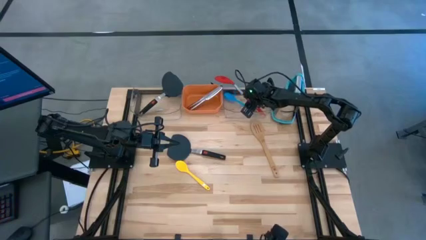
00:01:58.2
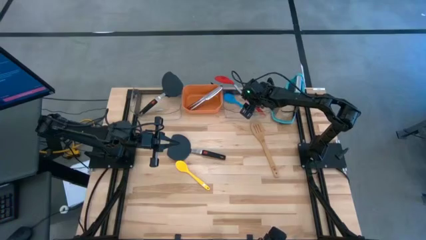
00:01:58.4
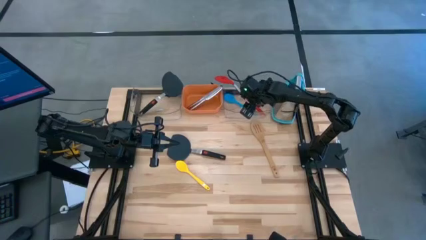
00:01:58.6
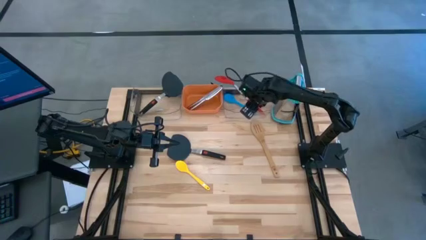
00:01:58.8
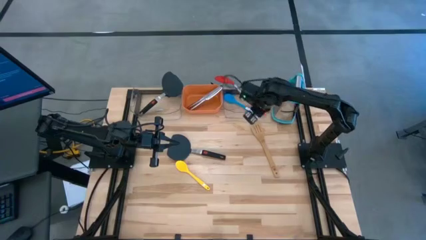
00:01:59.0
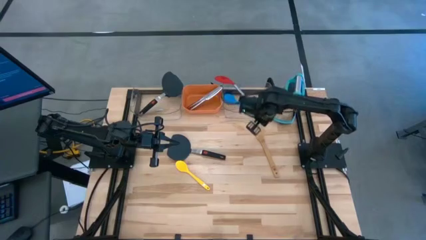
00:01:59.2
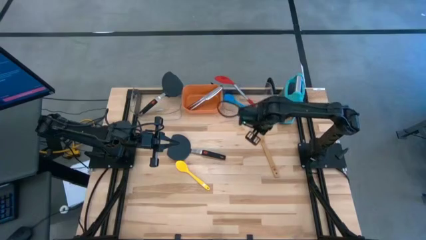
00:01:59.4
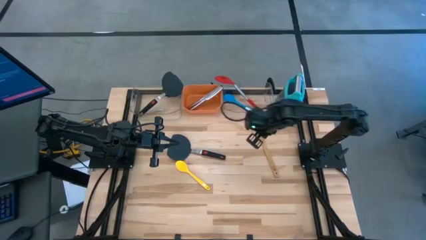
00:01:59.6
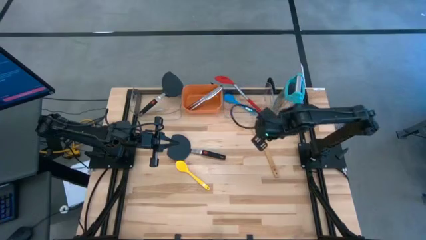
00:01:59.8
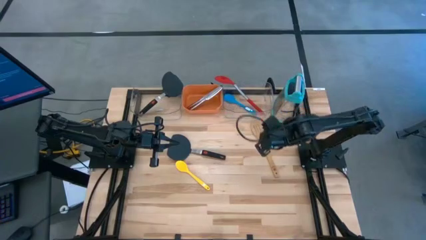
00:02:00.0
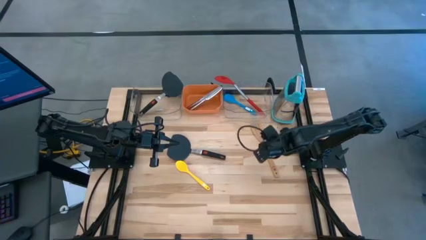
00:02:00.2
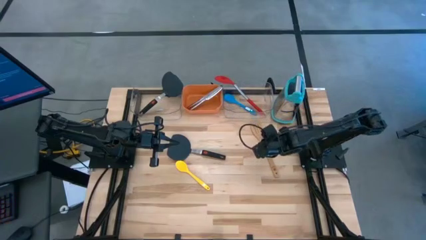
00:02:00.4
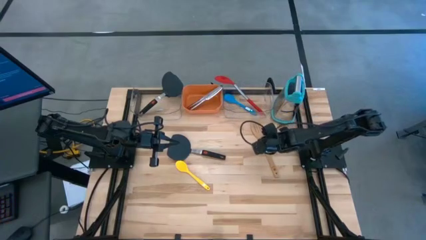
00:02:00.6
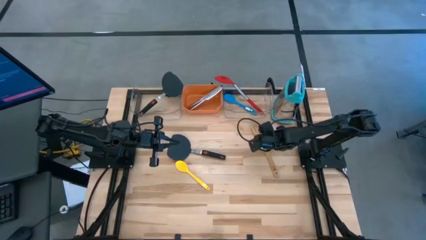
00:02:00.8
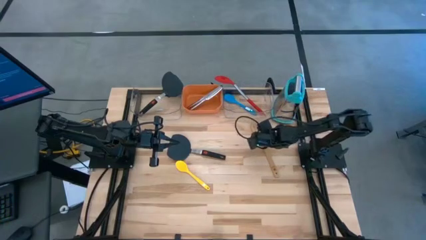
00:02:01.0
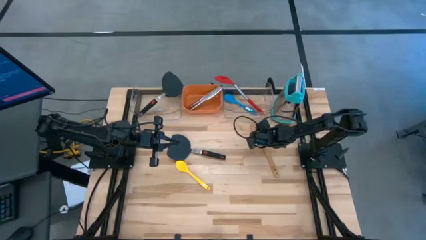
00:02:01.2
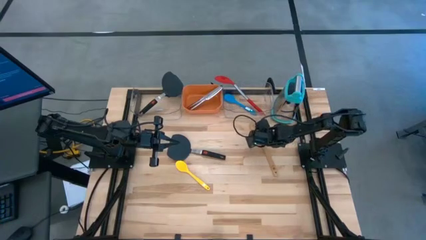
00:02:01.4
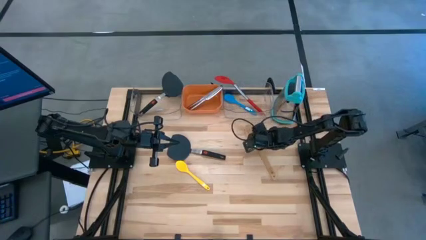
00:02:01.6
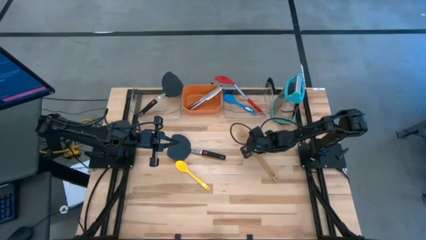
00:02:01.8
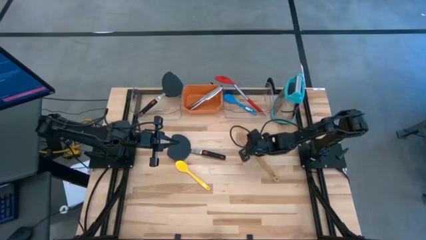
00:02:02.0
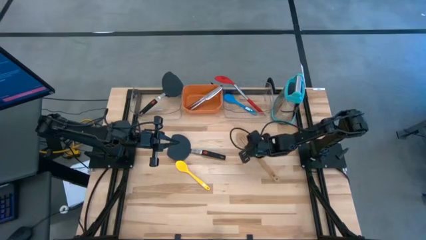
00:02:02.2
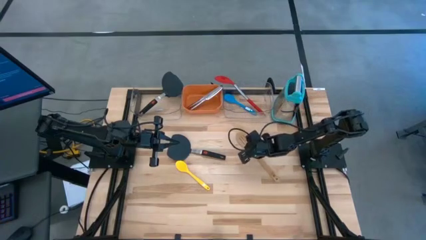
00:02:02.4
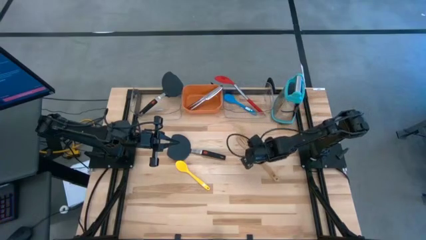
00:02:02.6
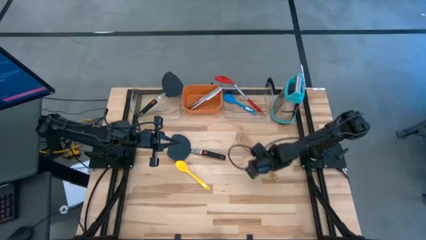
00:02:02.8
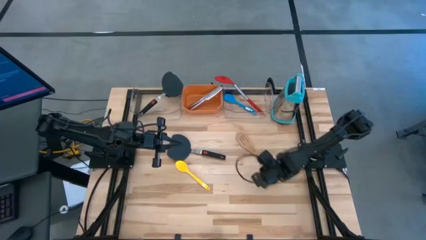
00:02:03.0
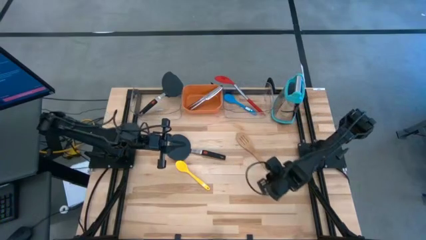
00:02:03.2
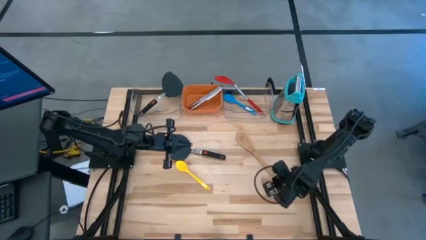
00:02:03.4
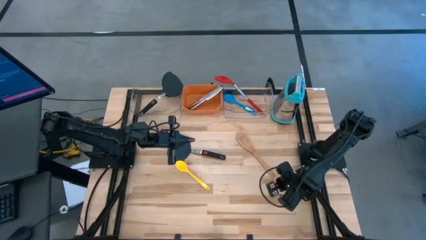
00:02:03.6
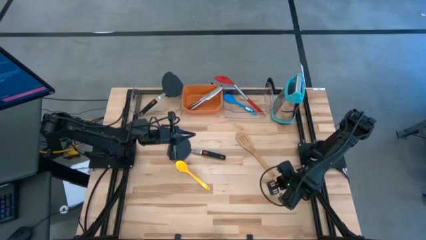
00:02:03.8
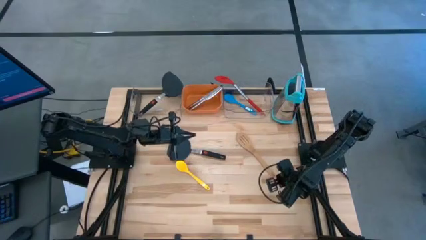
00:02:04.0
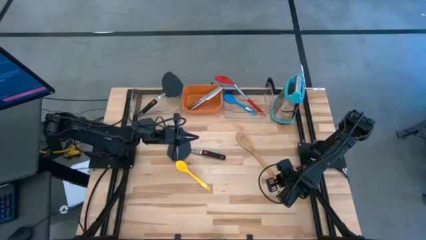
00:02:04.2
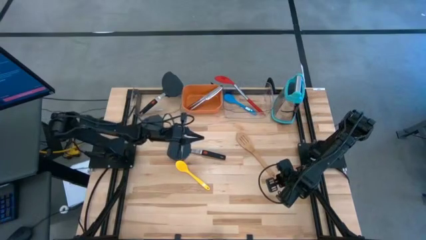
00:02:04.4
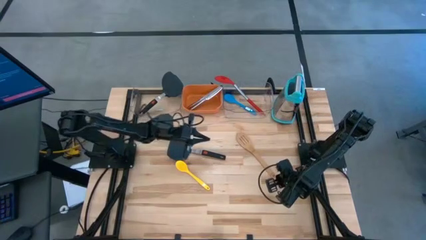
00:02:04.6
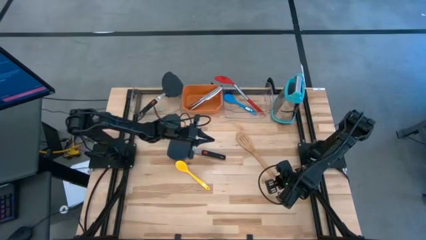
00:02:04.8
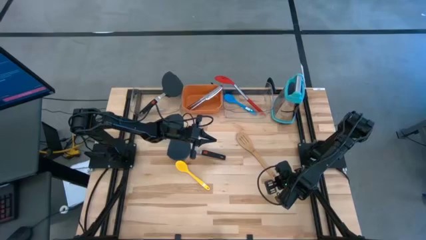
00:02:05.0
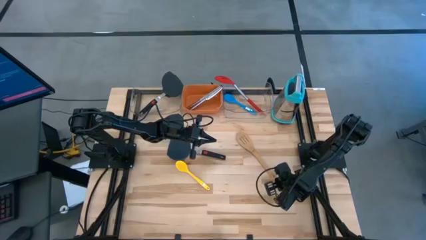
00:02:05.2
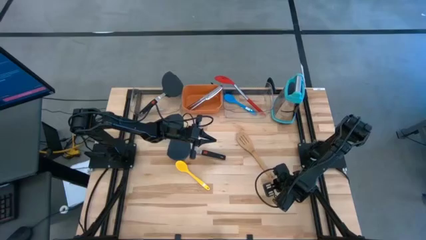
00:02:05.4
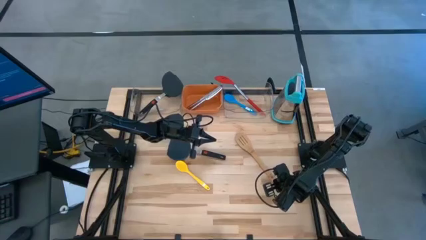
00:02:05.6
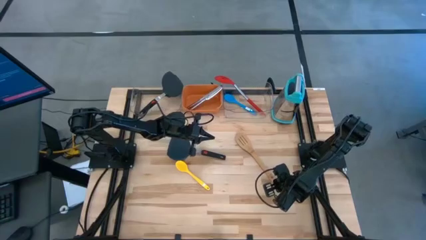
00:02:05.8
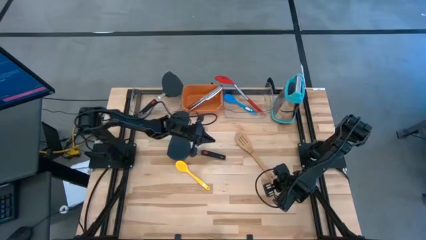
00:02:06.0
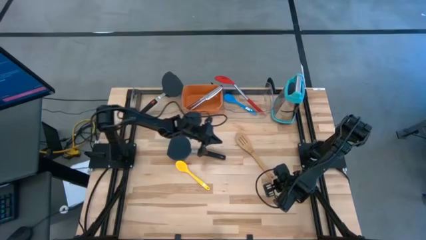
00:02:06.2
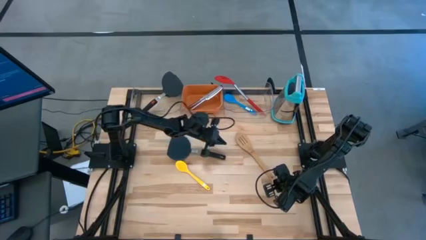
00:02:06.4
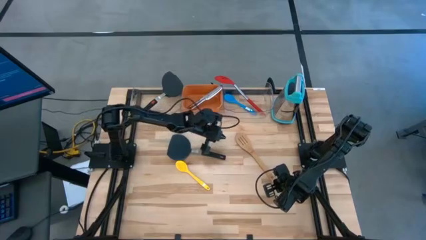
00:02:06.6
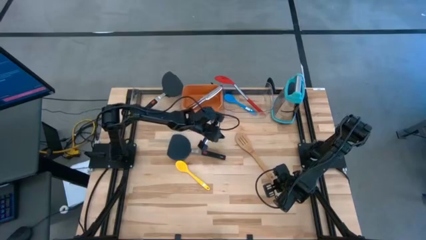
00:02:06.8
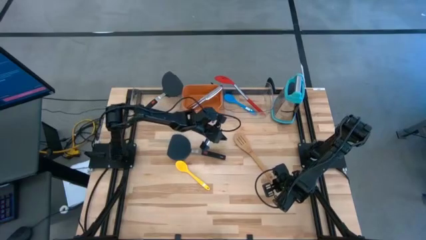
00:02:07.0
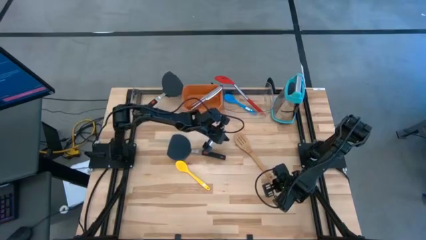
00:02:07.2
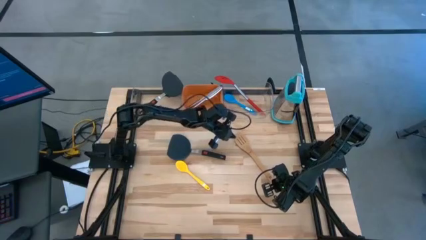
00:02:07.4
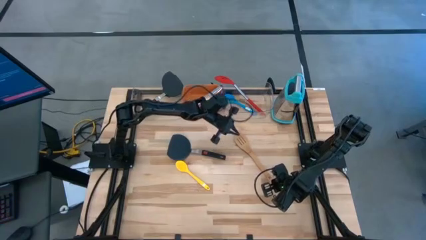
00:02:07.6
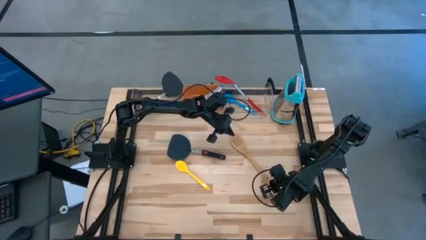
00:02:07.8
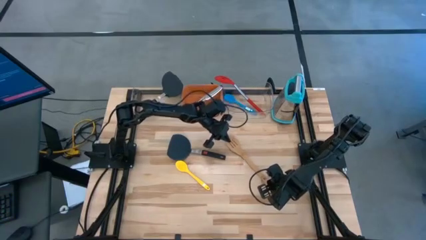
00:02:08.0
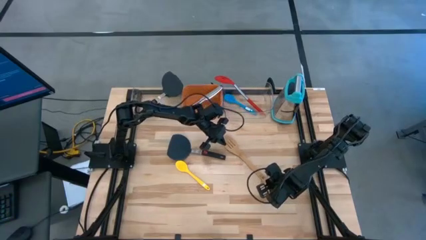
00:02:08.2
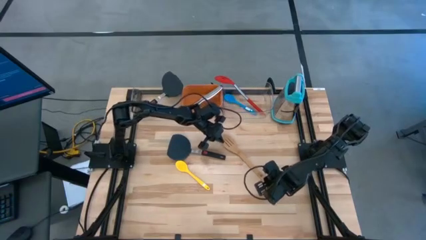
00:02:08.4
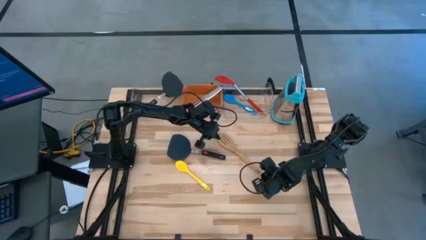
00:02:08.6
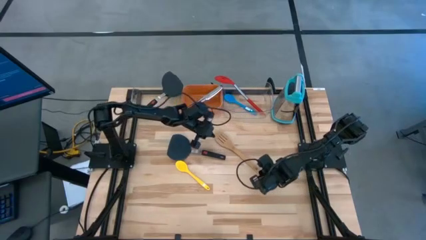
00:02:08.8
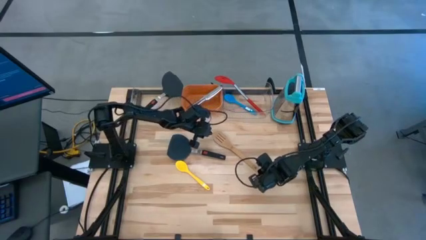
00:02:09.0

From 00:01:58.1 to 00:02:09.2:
Task: Pick & Place Kitchen Items
Put the wooden serving spoon into the right transparent bin

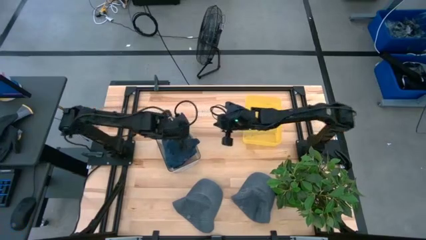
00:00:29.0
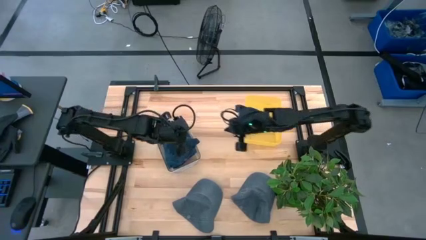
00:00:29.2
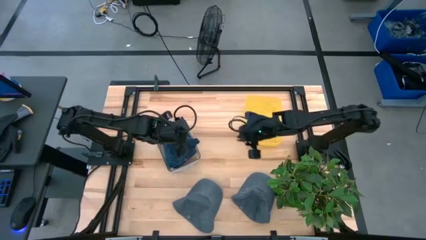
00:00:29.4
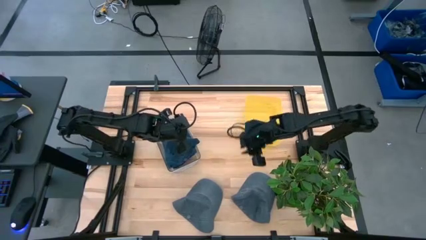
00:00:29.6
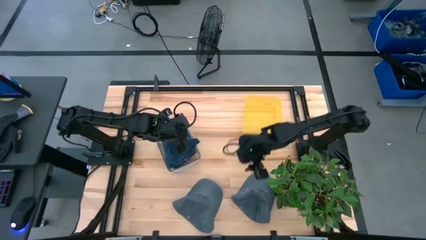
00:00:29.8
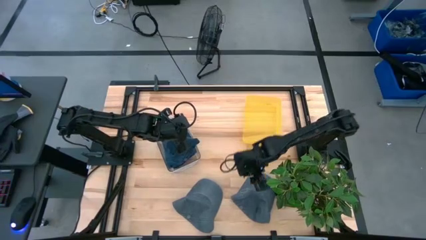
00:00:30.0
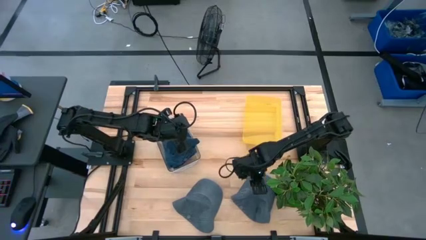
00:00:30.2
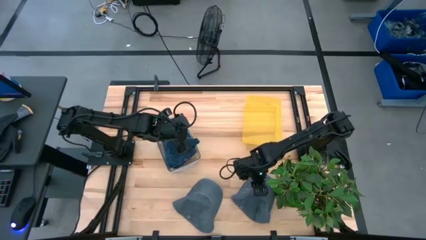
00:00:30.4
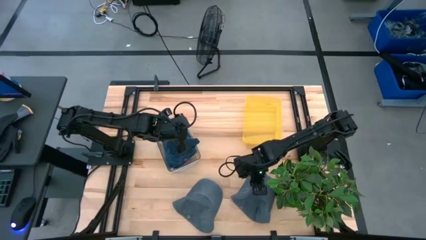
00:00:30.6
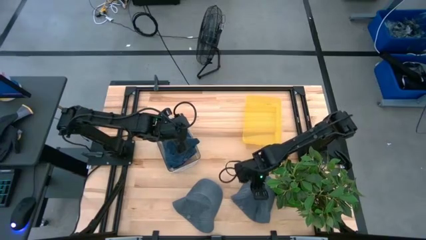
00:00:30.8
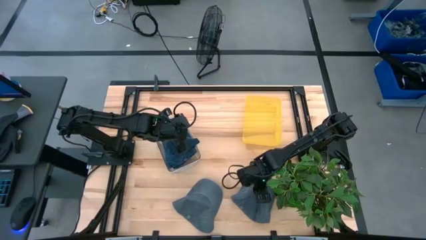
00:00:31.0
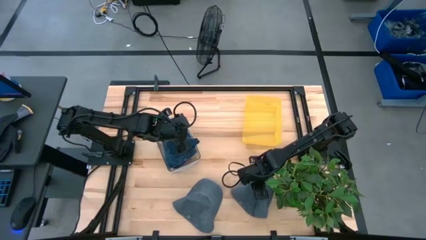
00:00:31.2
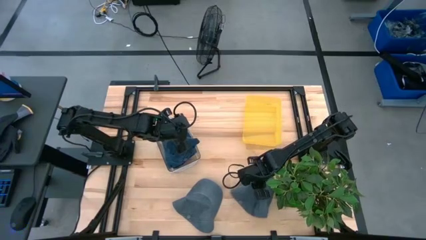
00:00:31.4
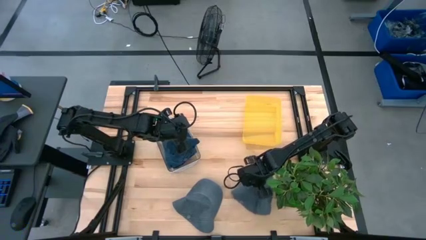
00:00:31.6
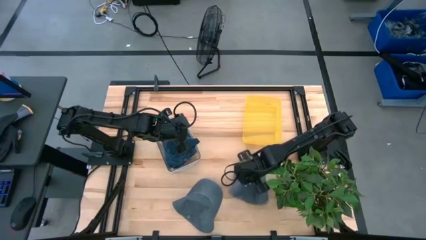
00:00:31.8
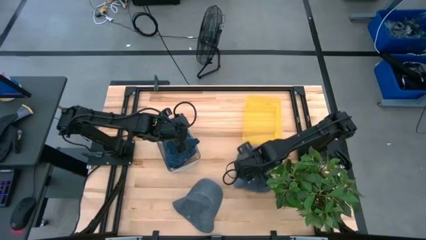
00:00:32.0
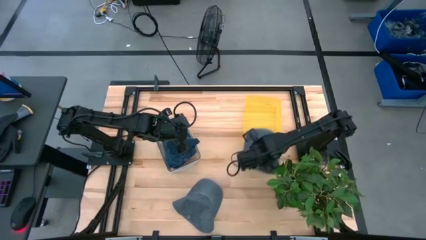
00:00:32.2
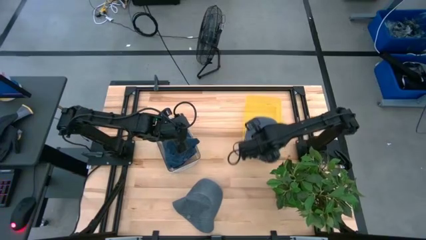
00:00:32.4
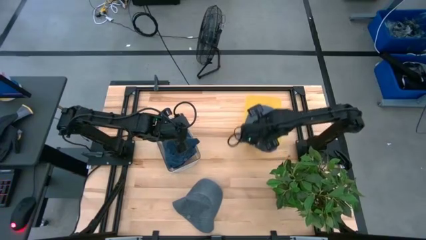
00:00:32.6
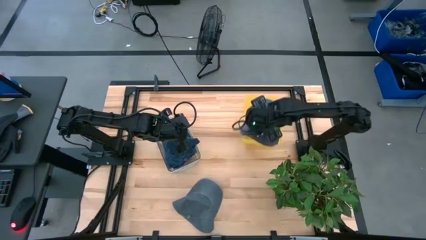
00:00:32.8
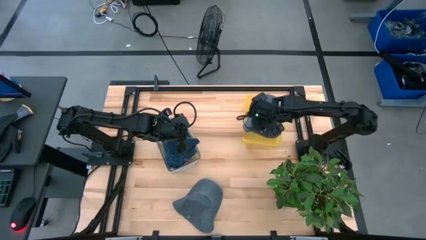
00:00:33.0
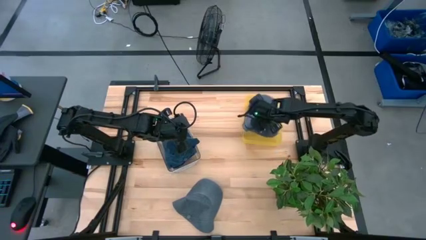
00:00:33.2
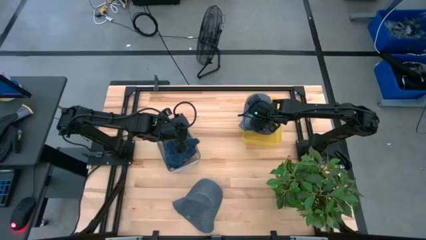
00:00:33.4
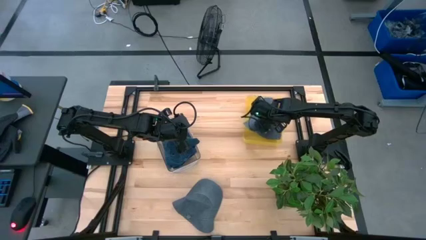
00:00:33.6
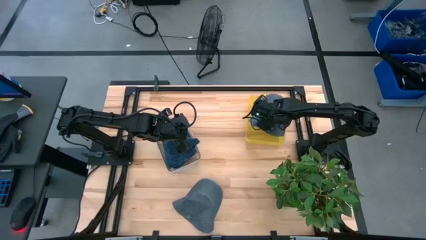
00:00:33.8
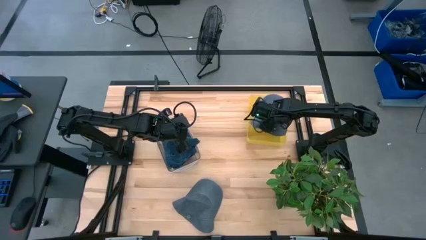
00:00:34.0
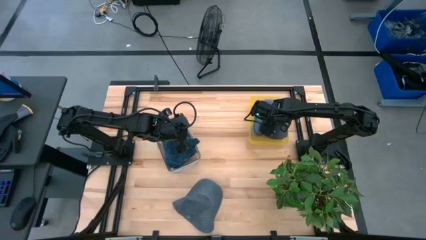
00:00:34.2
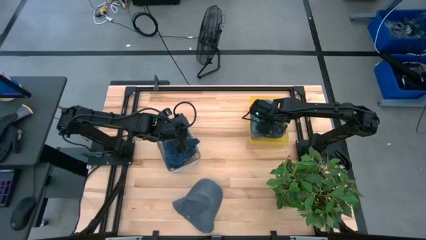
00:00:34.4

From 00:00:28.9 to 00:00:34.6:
Task: Pick & Place hat
Put the right gray cap into the yellow bin
